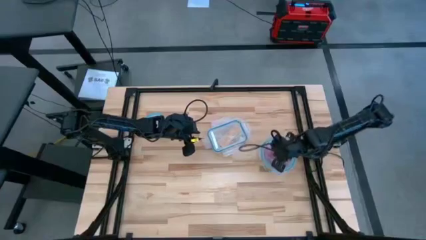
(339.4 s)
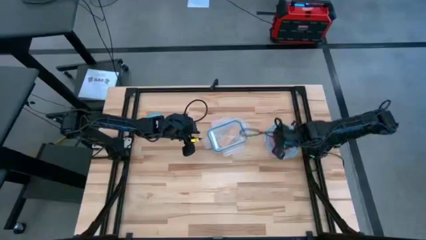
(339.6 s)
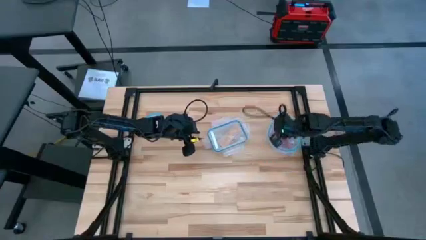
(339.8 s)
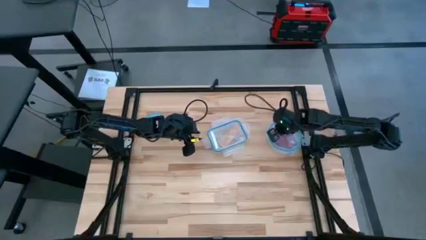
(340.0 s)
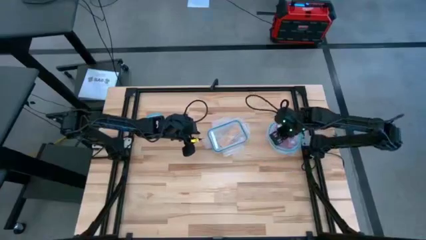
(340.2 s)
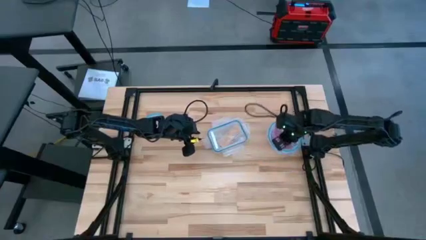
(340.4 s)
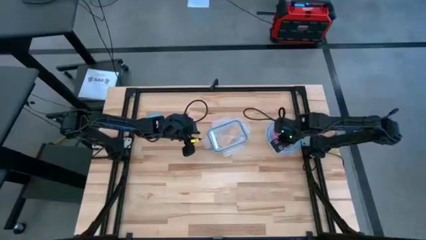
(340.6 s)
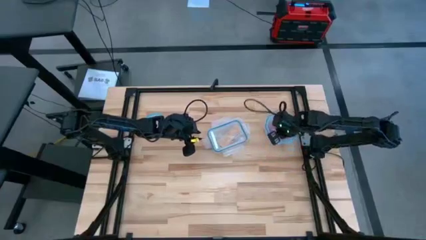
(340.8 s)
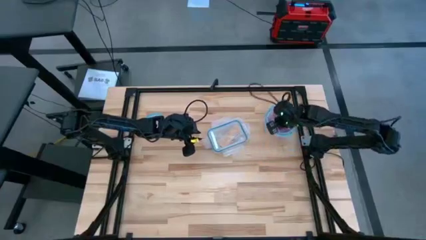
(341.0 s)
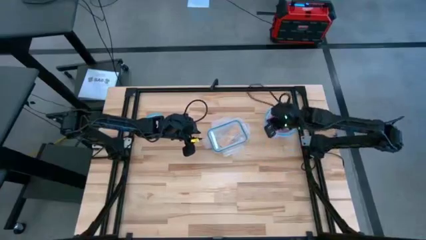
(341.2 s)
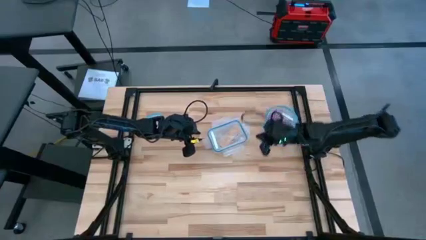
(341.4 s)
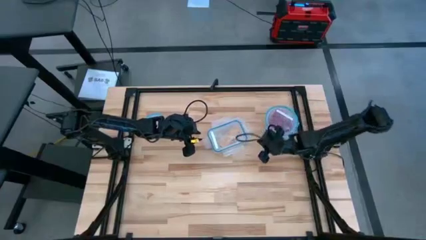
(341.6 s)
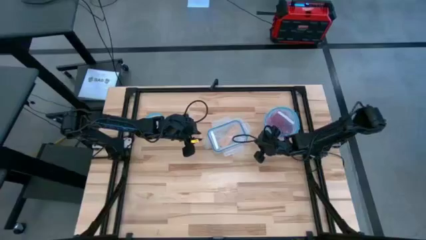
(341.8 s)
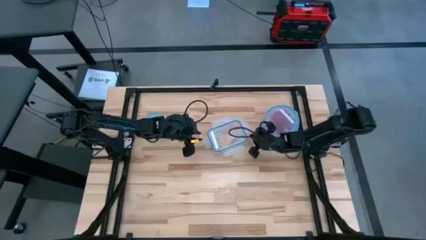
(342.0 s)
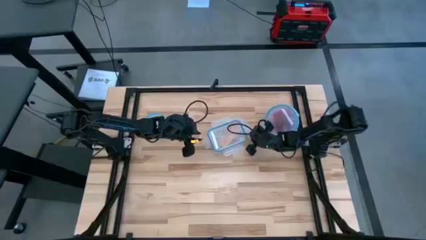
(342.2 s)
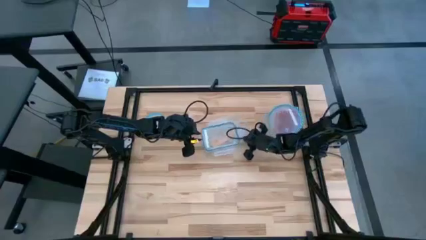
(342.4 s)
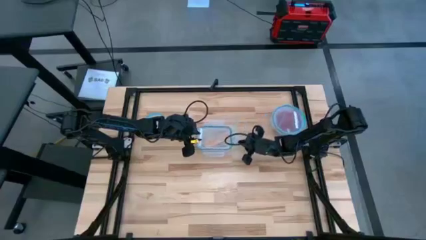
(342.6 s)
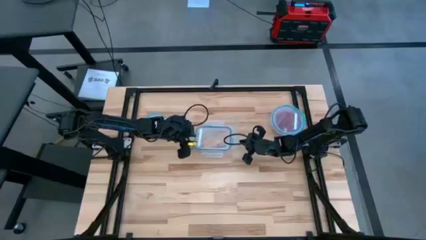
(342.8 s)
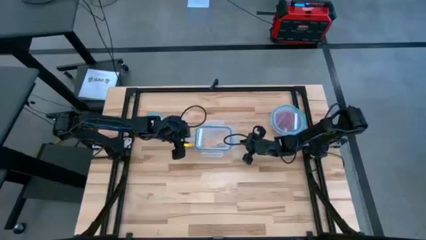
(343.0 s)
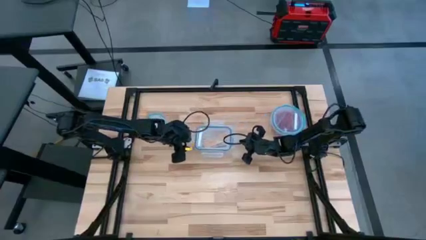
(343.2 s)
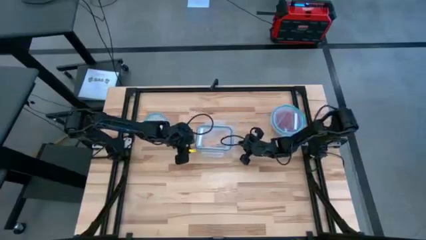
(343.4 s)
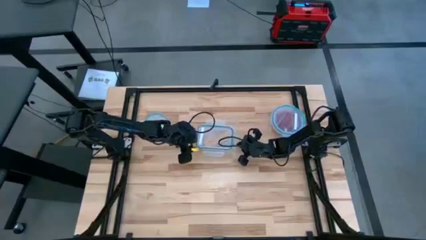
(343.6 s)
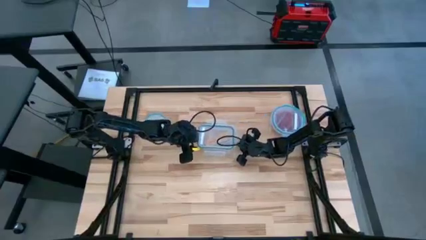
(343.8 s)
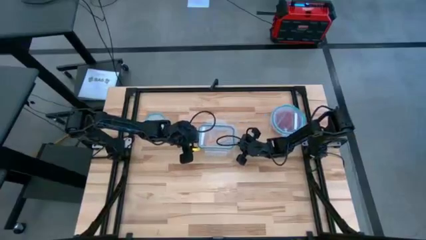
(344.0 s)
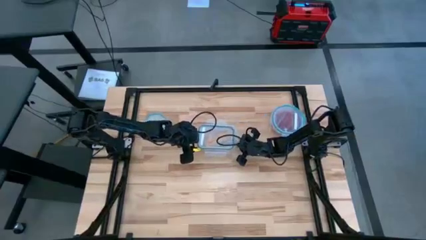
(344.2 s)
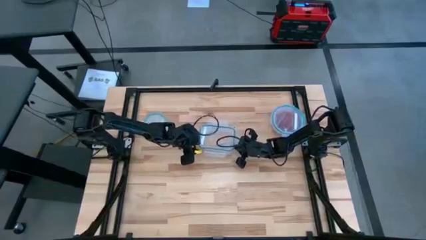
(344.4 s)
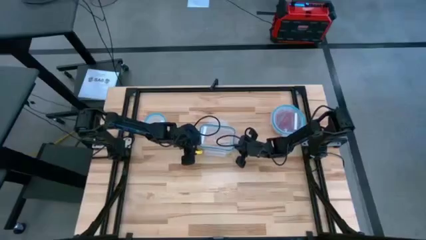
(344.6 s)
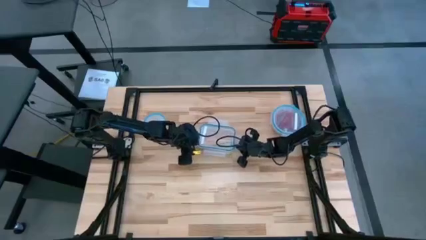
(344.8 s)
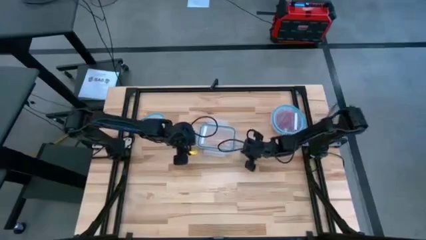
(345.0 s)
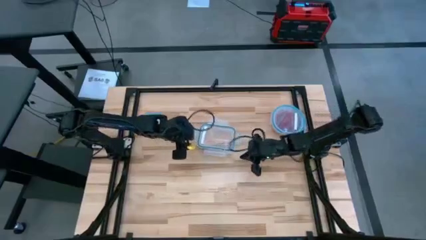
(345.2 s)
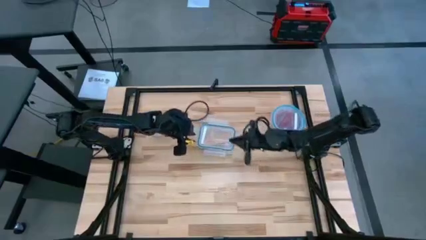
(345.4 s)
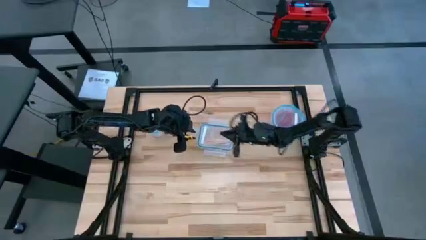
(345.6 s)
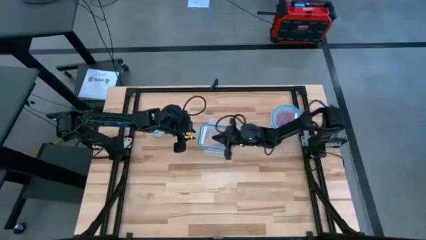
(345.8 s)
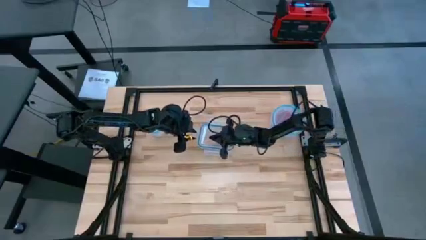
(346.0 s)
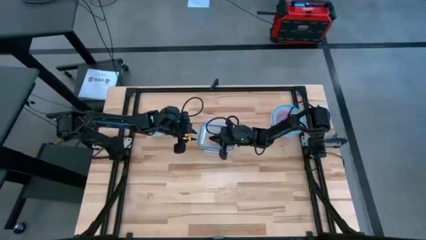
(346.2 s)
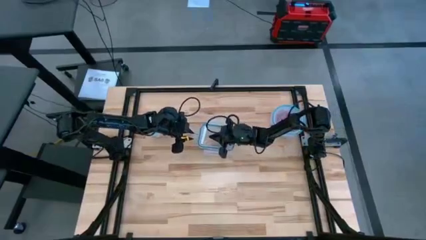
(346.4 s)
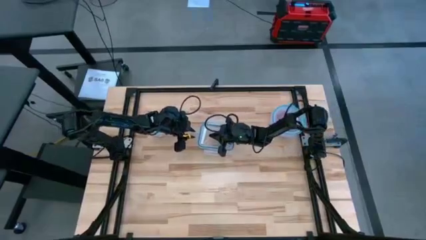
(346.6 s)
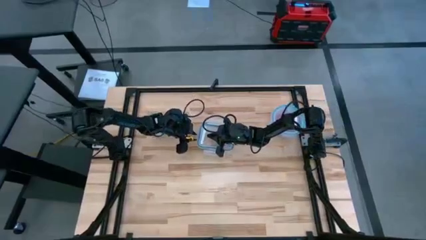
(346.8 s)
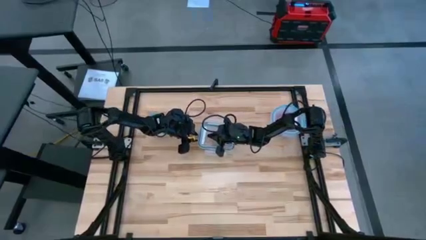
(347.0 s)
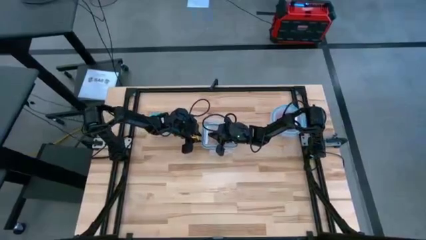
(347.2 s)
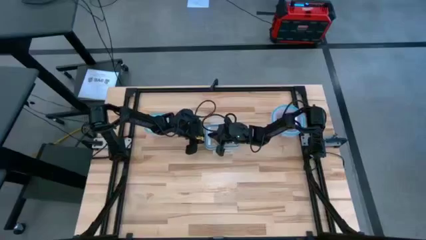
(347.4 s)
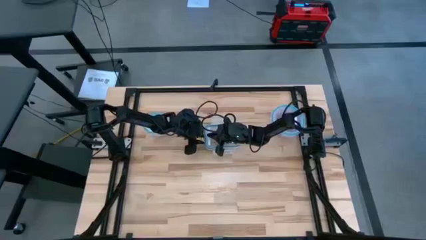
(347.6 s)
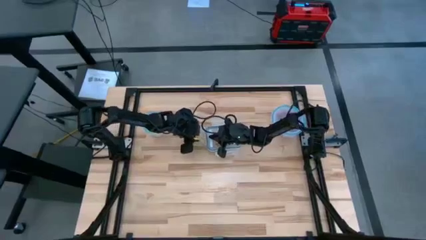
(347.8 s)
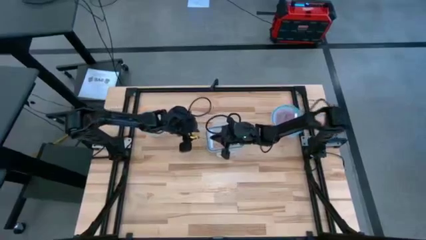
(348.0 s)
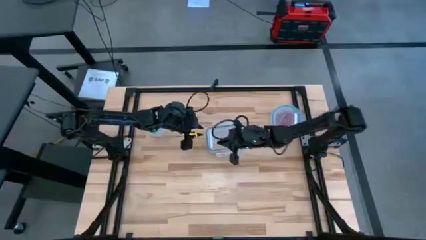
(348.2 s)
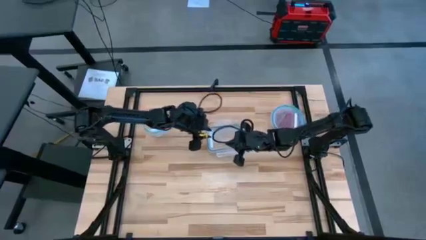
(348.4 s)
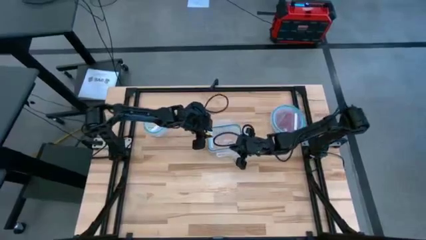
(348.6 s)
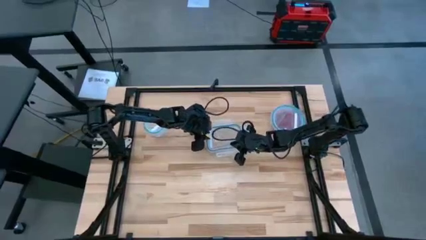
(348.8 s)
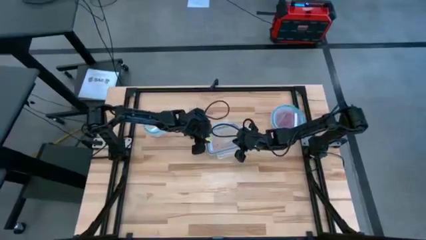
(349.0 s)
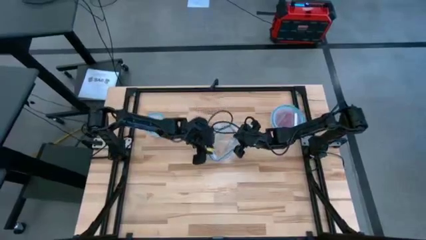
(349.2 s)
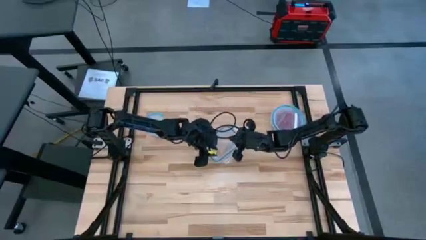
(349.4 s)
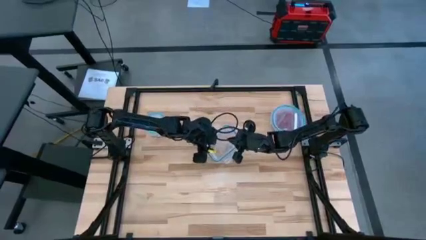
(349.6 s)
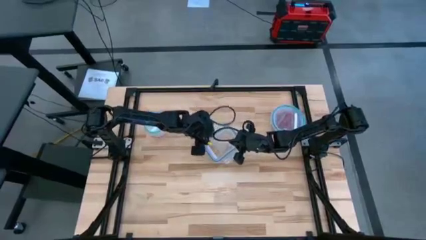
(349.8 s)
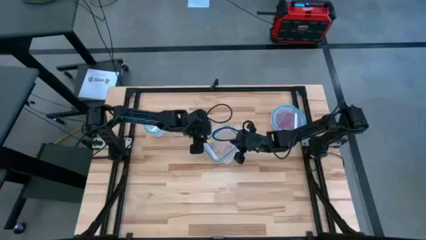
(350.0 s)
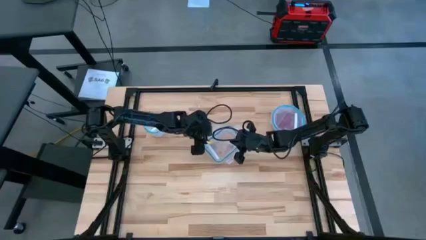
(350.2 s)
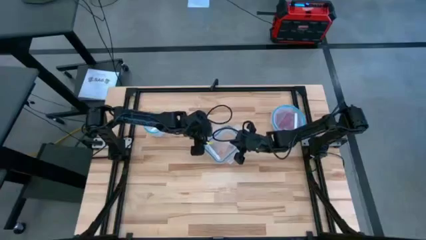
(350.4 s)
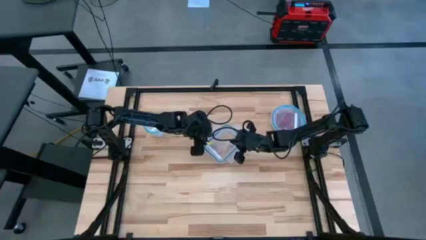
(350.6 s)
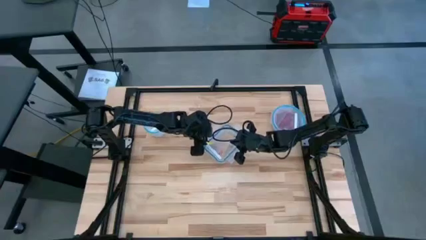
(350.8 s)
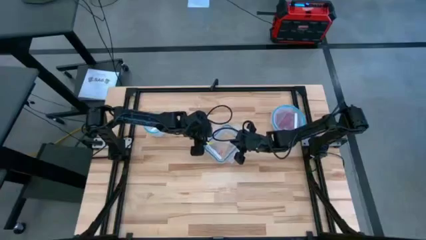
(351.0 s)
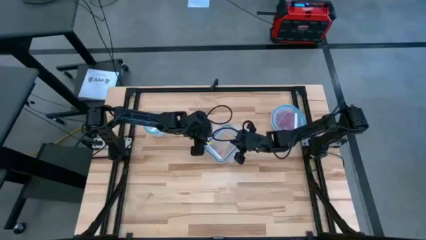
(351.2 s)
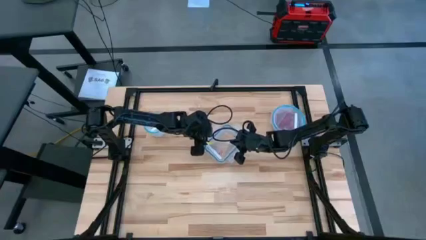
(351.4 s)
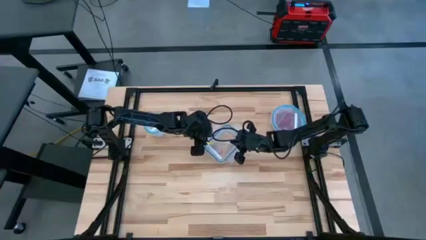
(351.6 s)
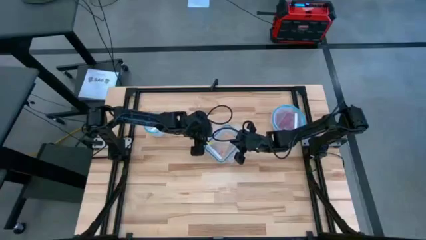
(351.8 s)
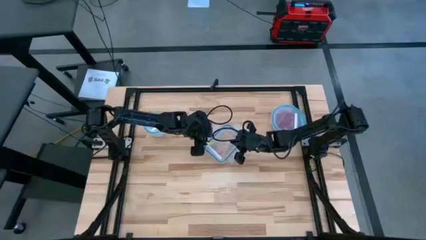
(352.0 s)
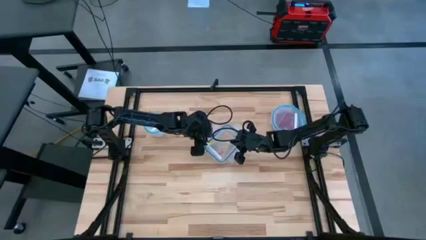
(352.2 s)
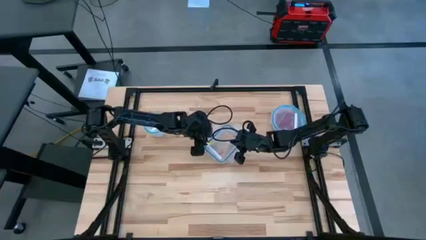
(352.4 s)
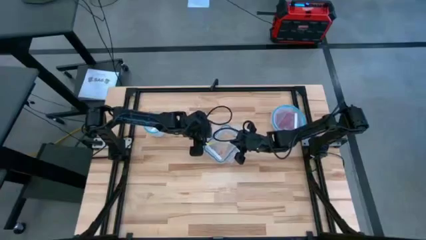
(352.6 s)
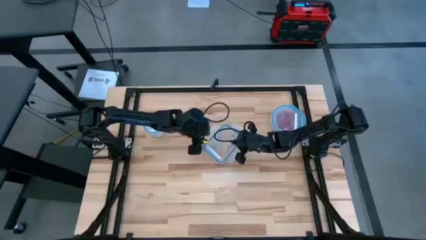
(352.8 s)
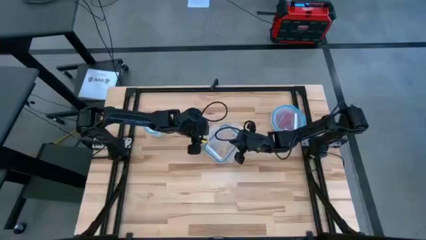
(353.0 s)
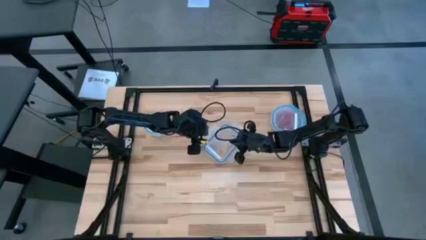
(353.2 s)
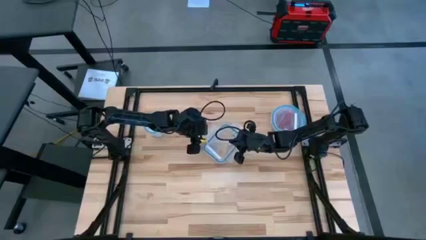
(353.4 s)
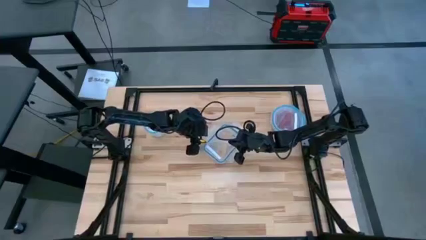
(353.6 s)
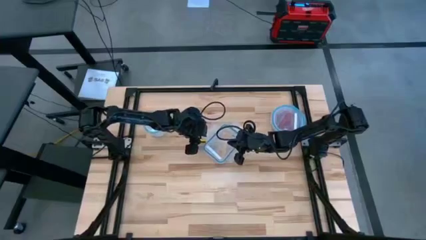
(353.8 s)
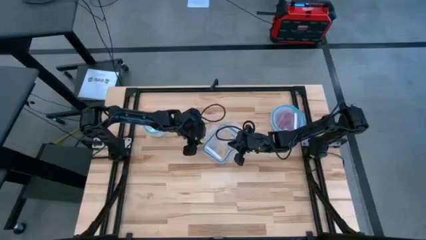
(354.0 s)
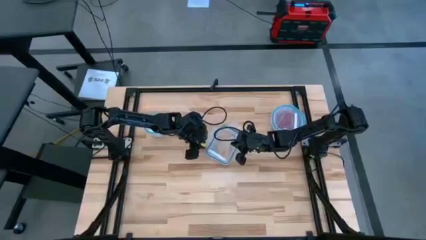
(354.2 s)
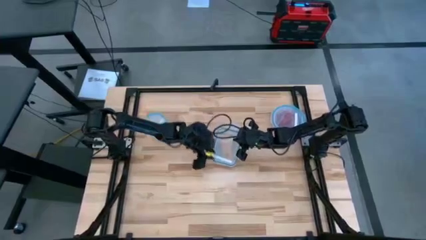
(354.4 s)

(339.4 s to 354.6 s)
Task: Sort candy
Close the rectangular transparent bin
